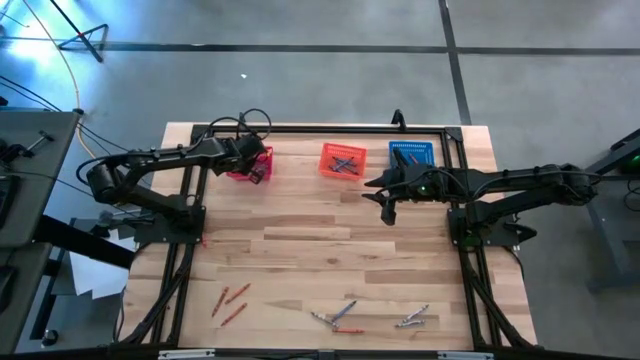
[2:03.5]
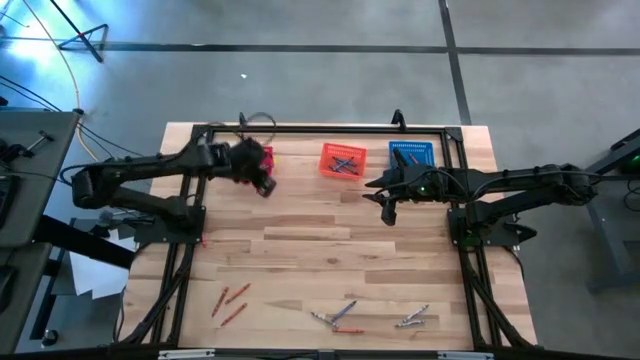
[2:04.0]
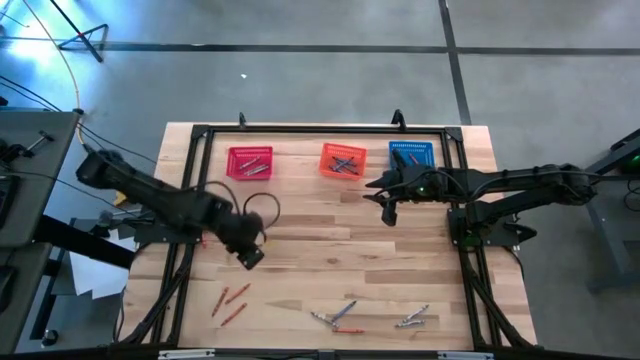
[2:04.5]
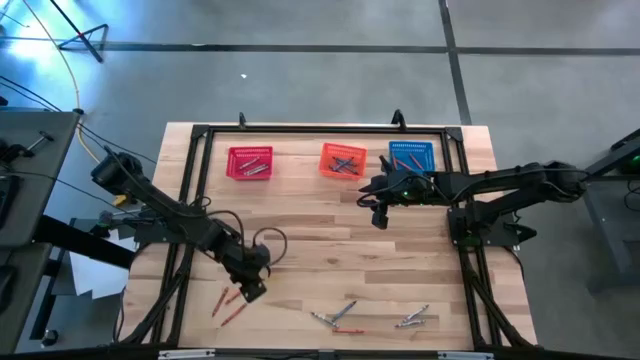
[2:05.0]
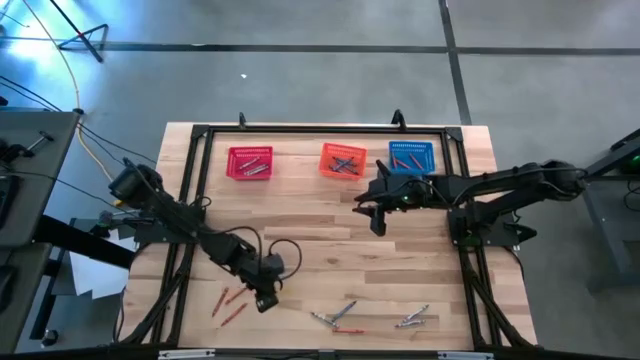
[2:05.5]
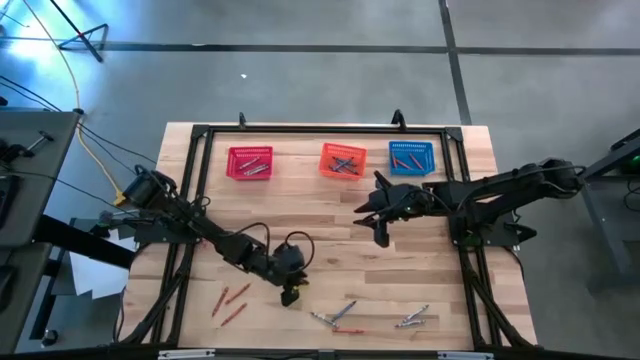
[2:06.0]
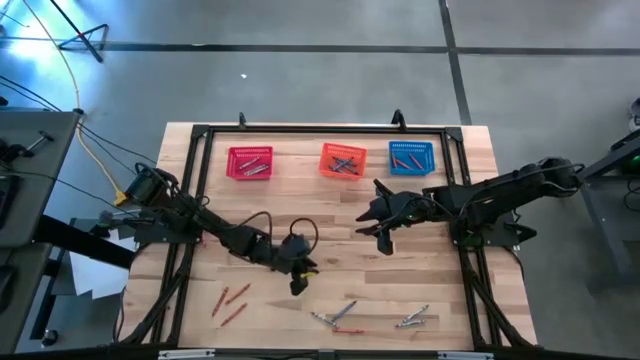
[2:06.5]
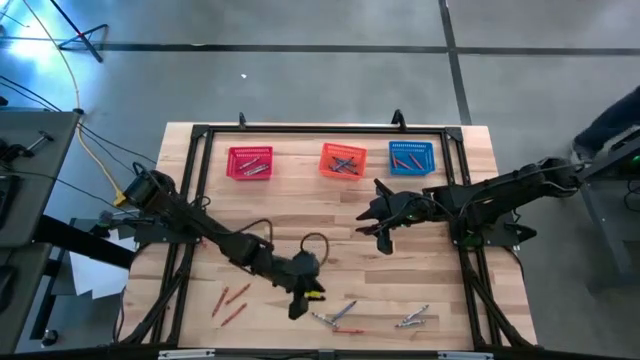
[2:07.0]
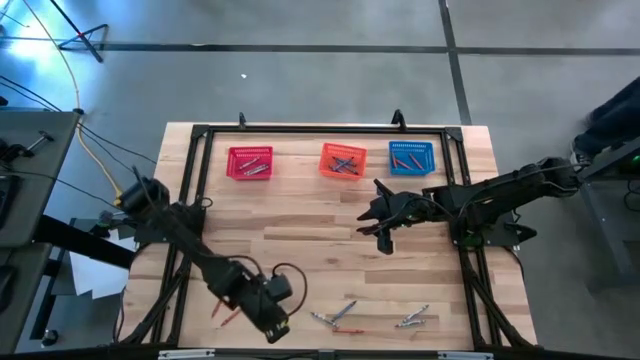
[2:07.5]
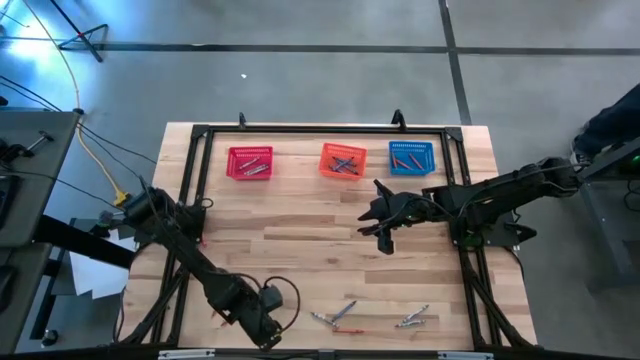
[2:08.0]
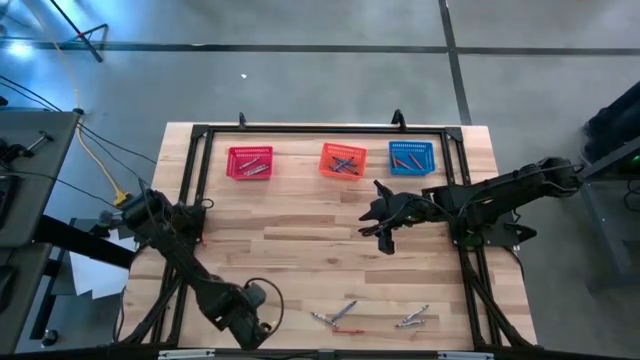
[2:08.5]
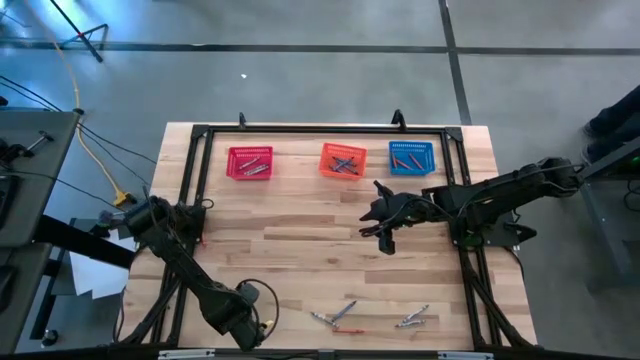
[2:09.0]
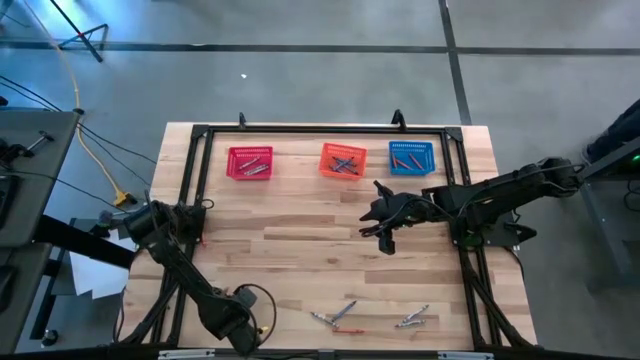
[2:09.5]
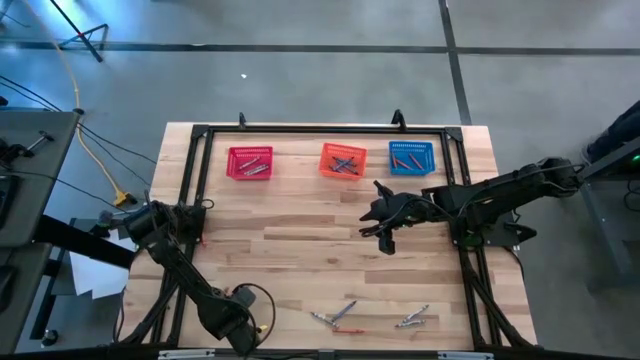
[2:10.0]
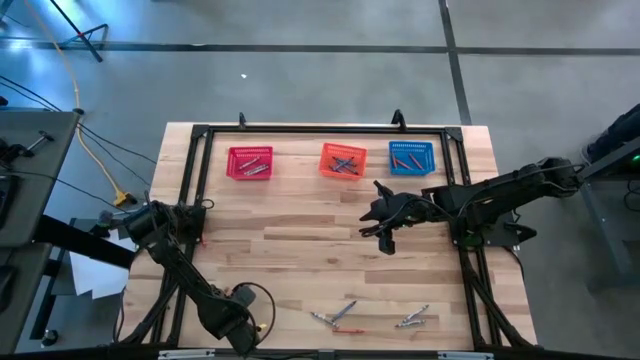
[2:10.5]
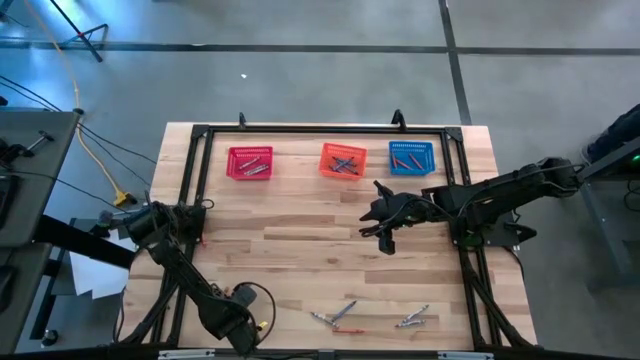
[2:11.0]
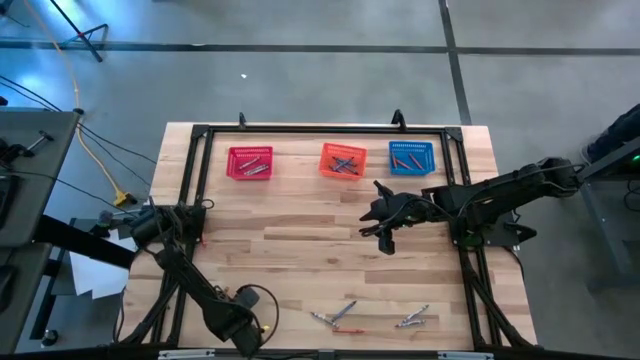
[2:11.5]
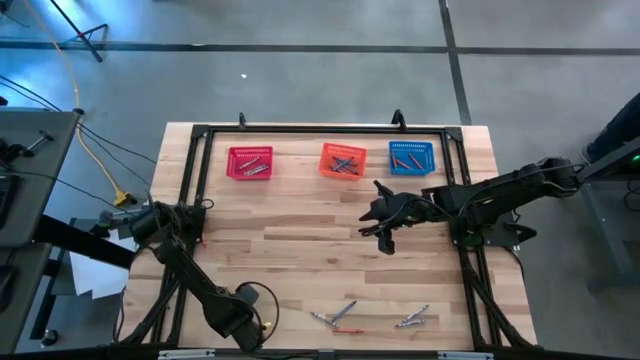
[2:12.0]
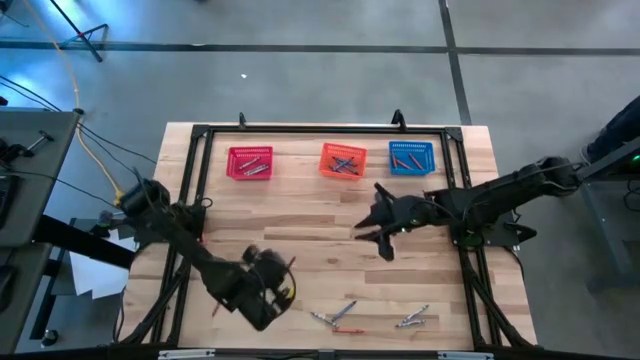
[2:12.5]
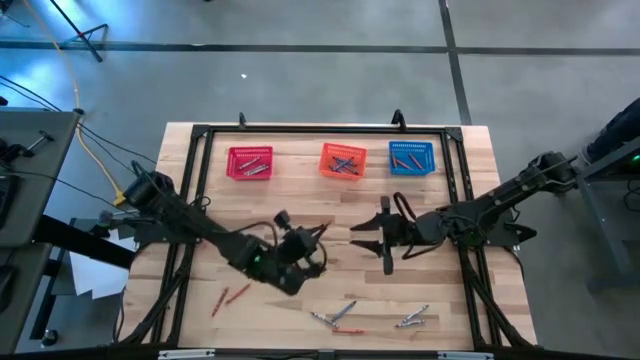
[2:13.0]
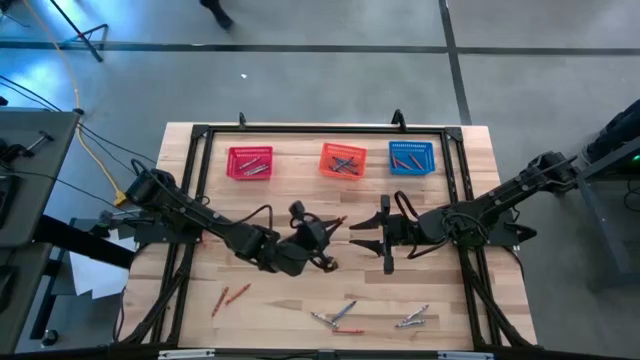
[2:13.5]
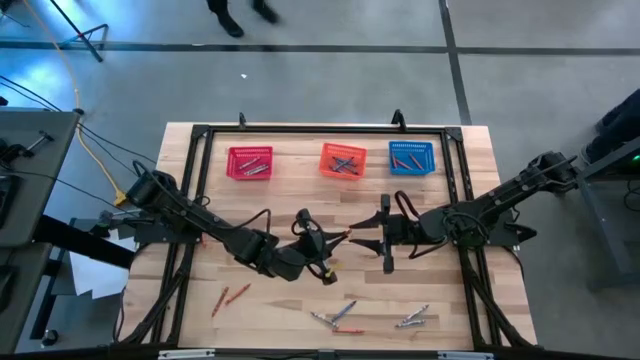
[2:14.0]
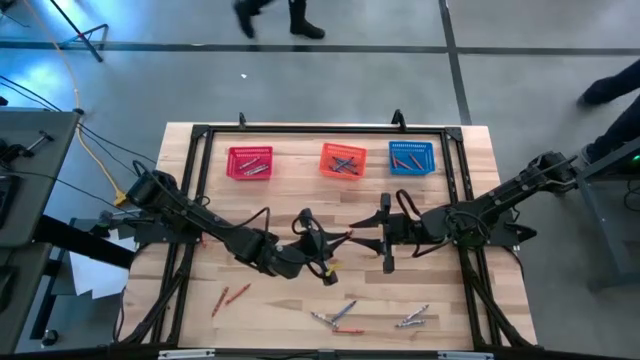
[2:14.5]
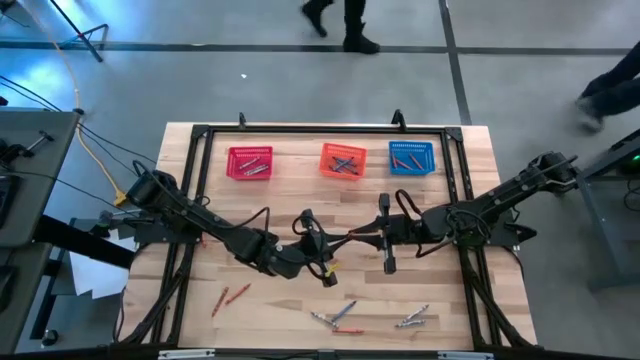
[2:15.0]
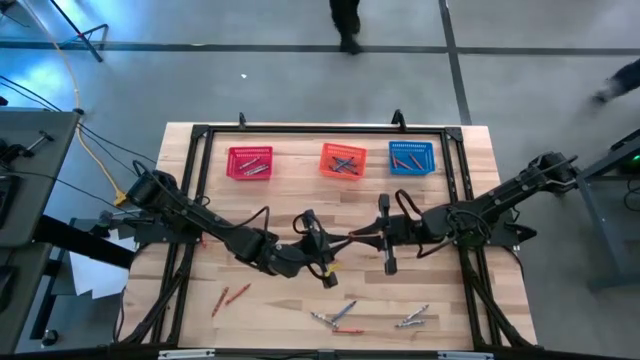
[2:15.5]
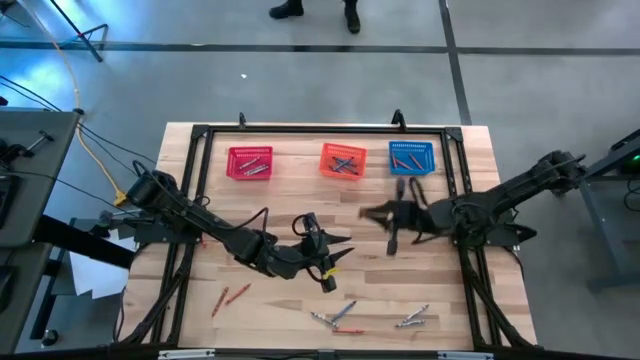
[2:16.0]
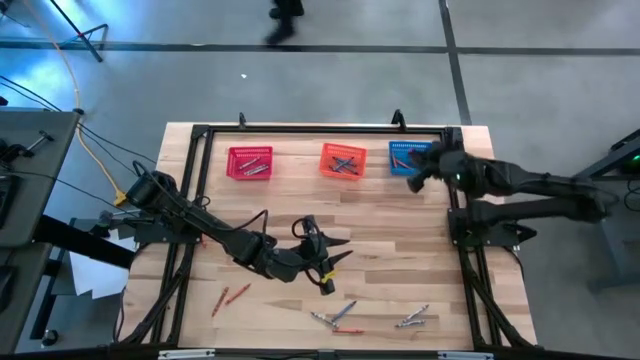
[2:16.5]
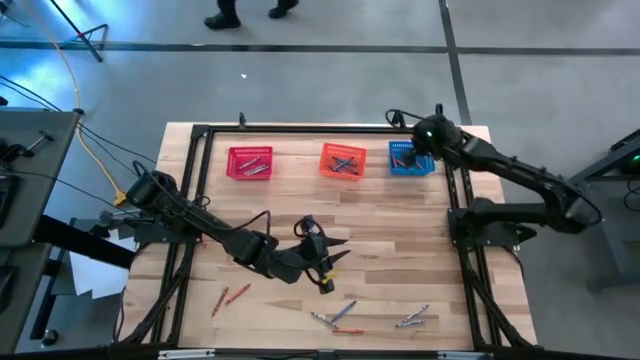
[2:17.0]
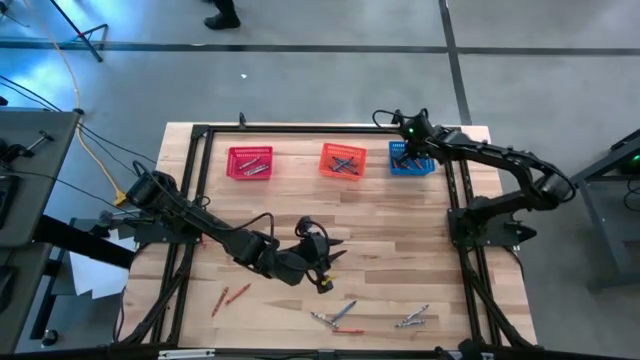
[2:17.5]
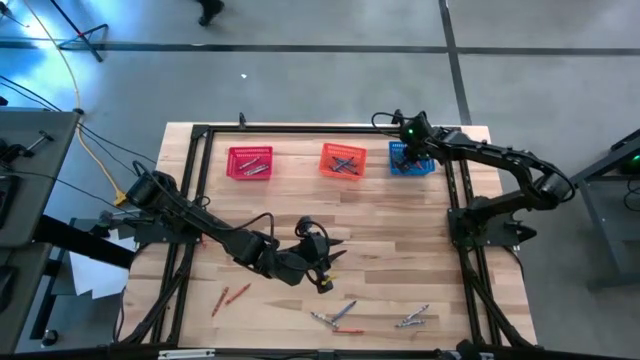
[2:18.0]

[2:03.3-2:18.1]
Task: Sort crayons
Put the orange crayon into the blue bin

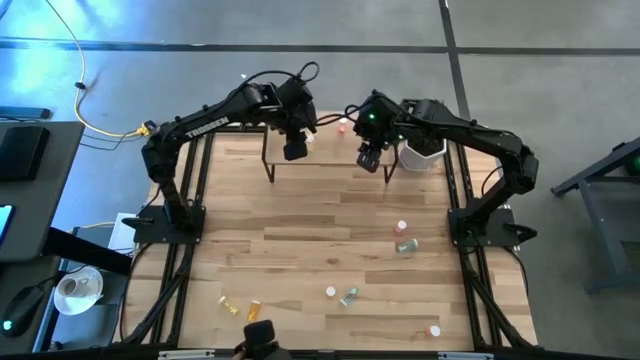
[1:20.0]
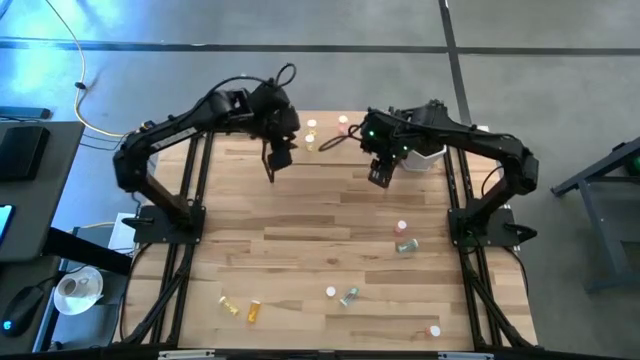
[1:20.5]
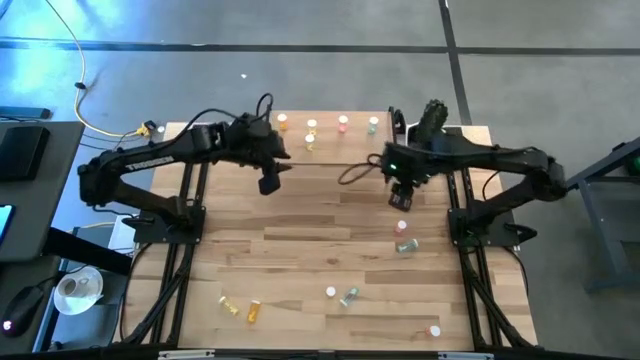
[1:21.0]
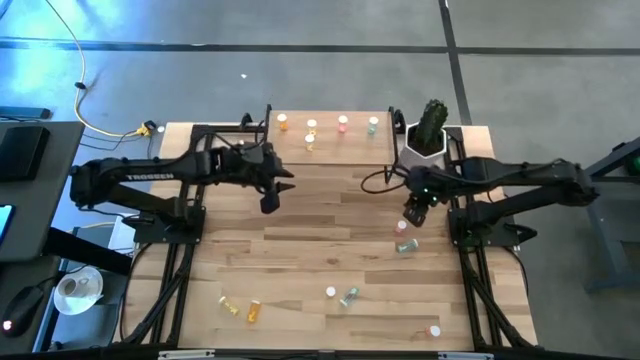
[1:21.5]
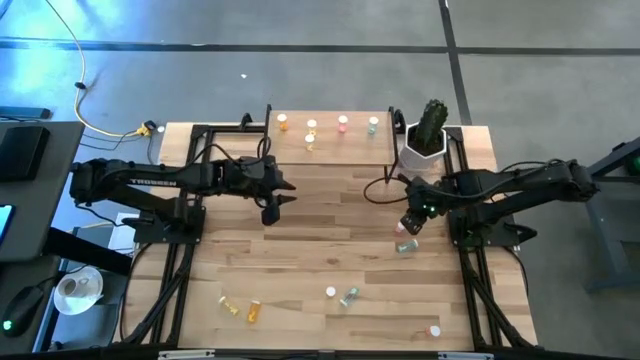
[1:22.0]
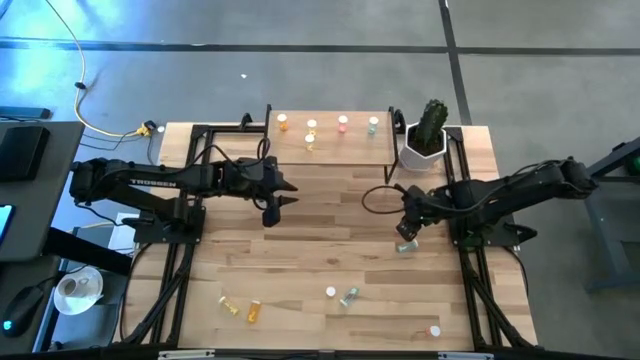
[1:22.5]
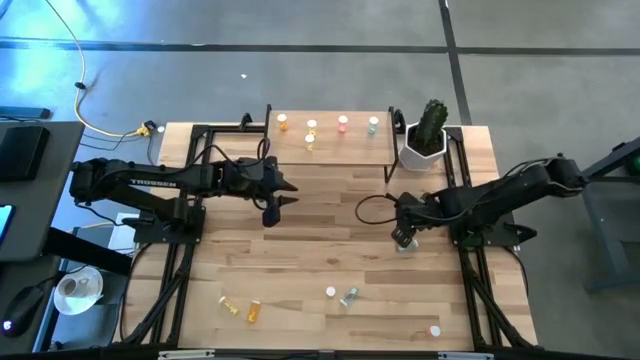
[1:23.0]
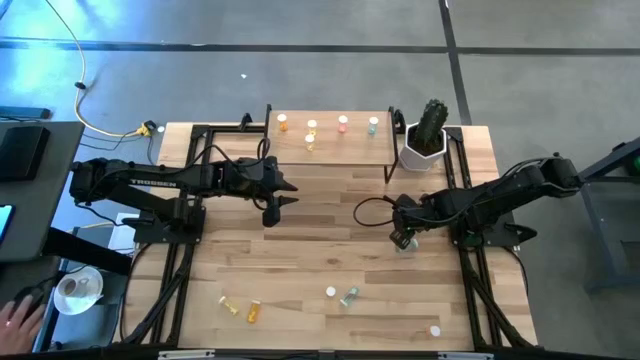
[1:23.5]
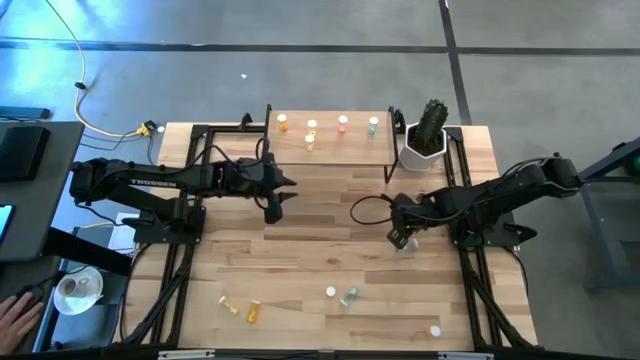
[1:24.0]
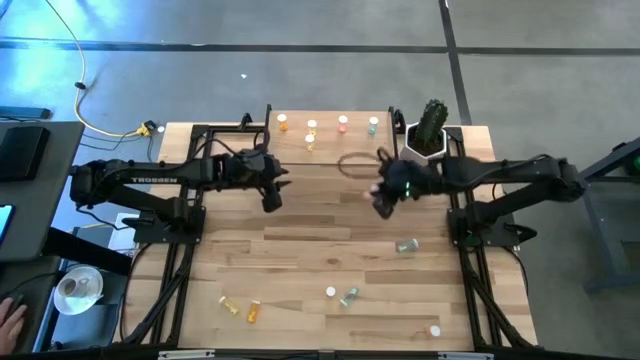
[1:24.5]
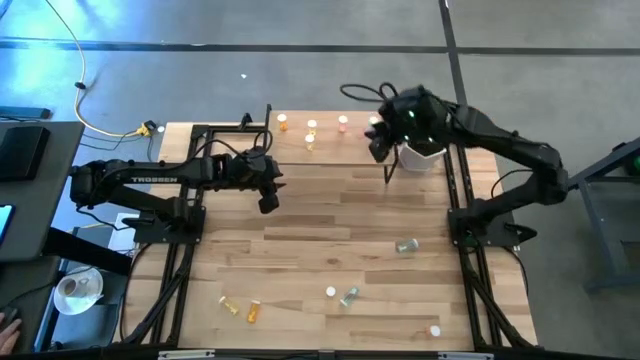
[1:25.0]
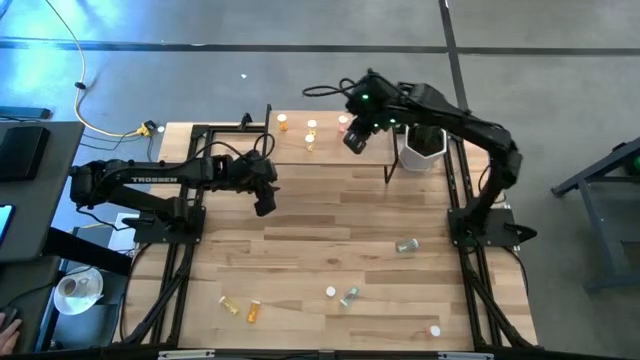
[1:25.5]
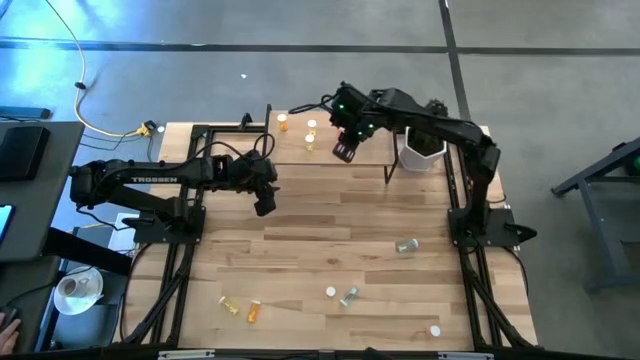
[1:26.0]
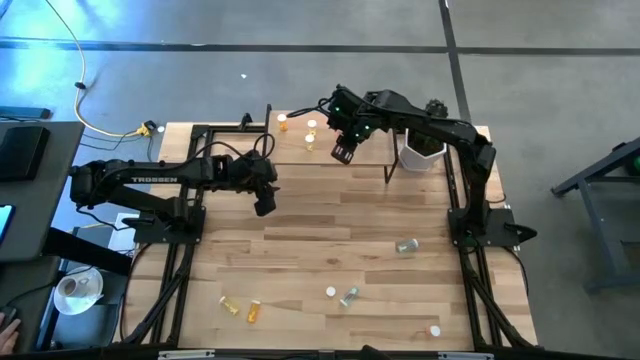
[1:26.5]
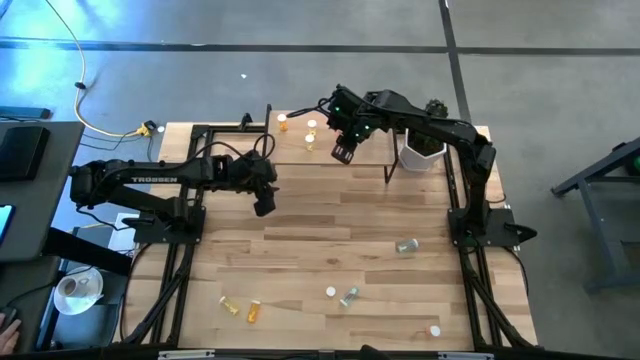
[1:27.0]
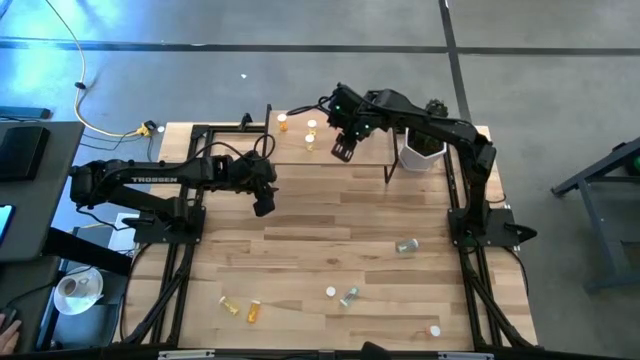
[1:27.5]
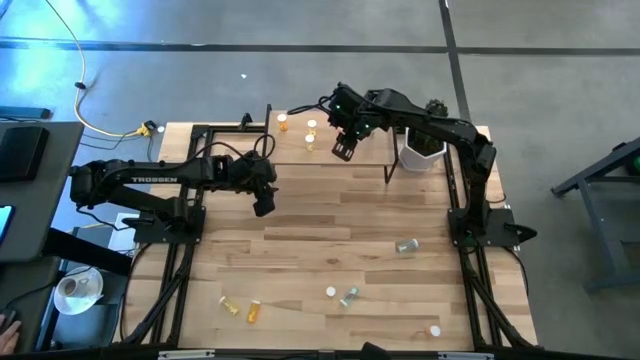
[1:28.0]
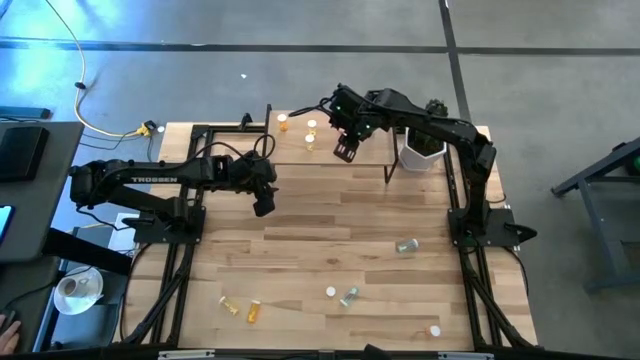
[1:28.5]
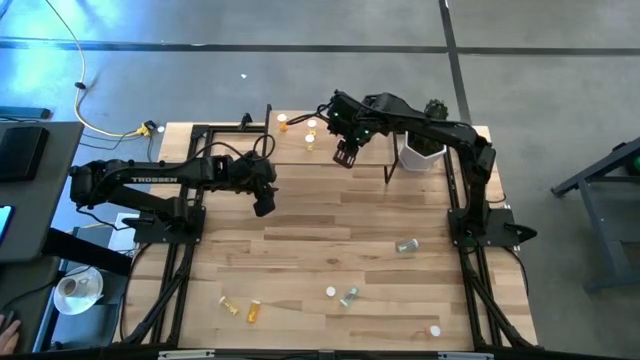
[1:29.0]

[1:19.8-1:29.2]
Task: Pick and place medicine bottles onto shelf by color
Put the top pink pill bottle on the shelf aligned with the other pink pill bottle
